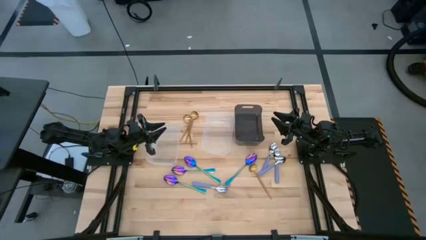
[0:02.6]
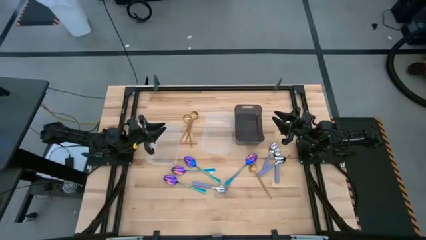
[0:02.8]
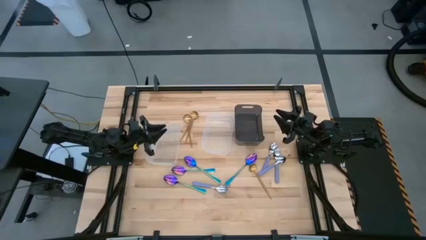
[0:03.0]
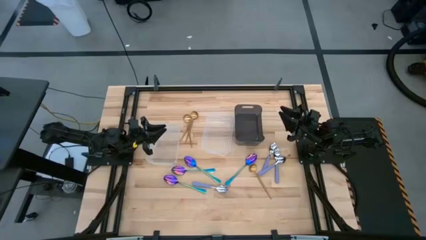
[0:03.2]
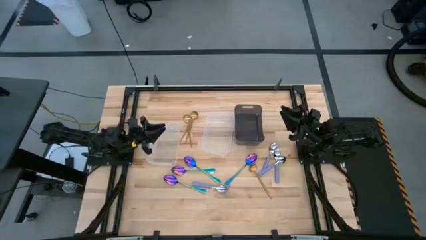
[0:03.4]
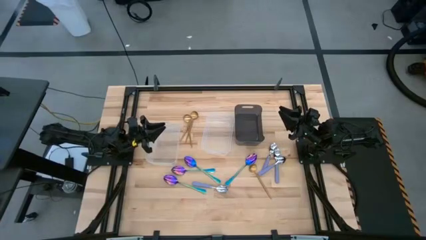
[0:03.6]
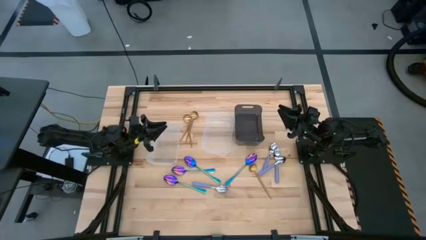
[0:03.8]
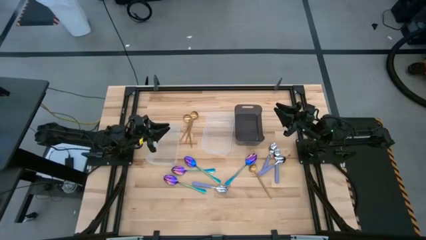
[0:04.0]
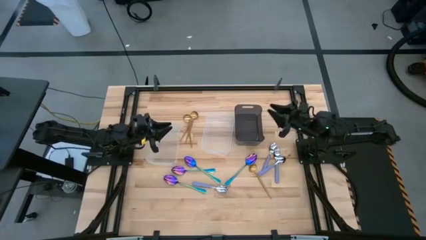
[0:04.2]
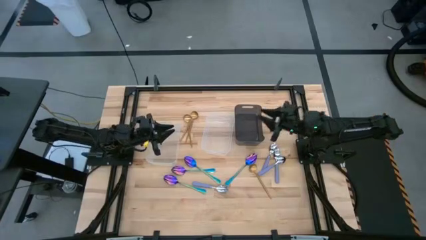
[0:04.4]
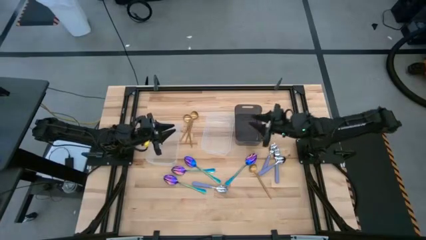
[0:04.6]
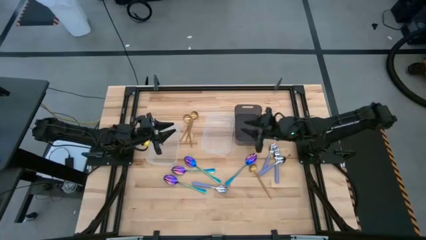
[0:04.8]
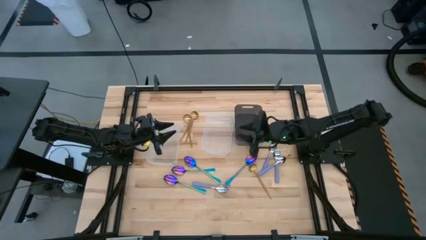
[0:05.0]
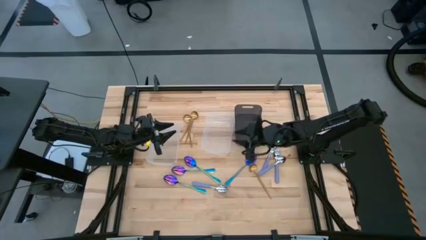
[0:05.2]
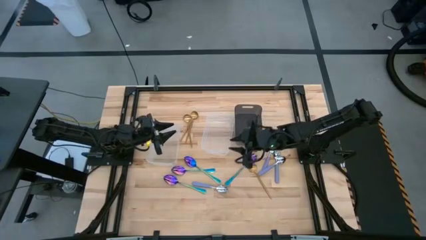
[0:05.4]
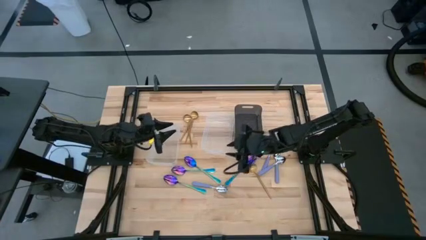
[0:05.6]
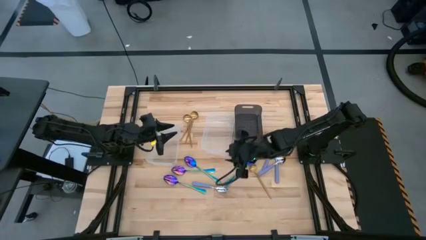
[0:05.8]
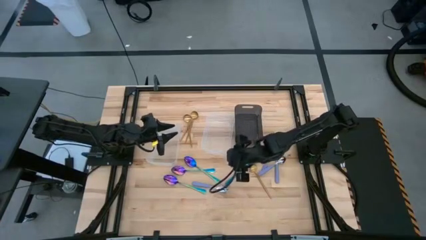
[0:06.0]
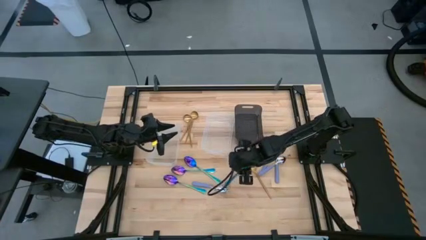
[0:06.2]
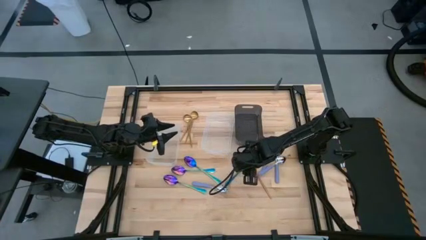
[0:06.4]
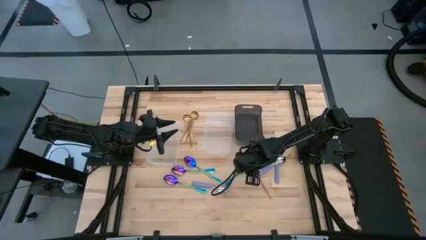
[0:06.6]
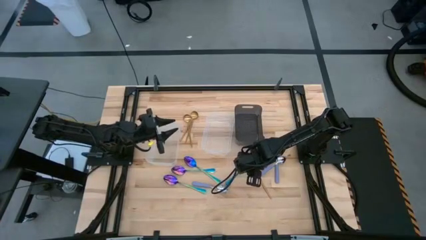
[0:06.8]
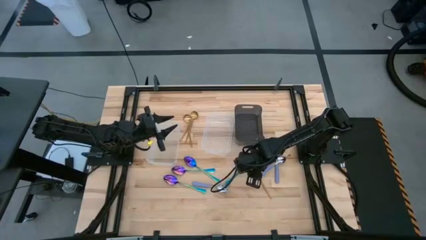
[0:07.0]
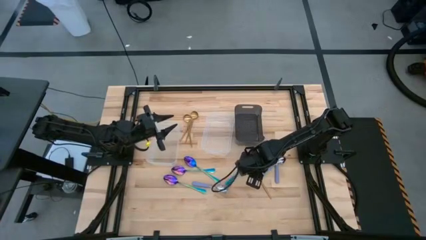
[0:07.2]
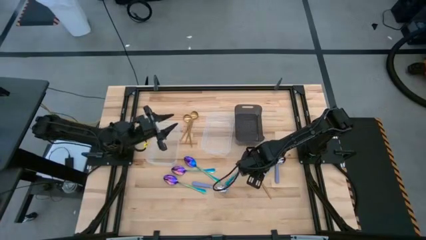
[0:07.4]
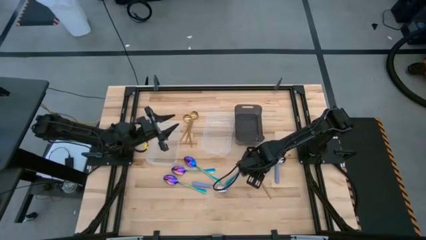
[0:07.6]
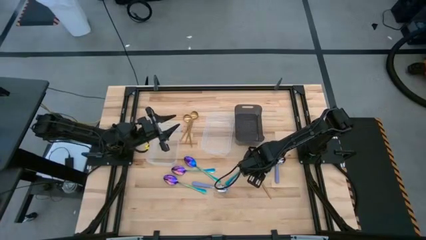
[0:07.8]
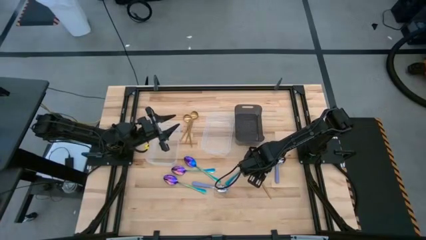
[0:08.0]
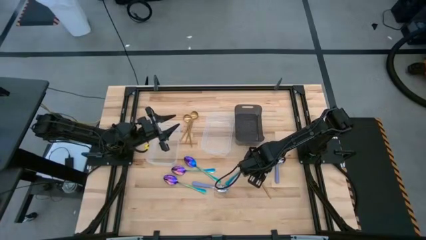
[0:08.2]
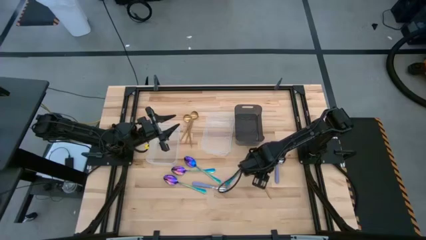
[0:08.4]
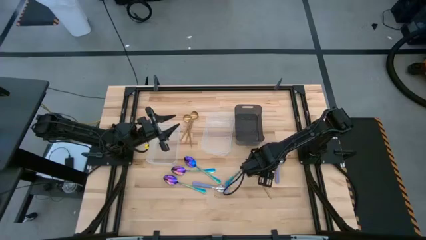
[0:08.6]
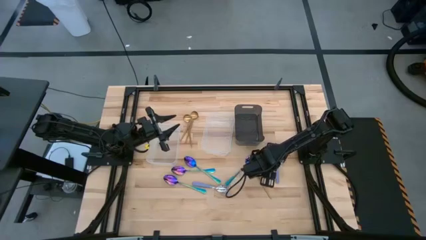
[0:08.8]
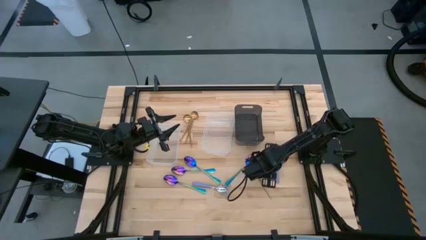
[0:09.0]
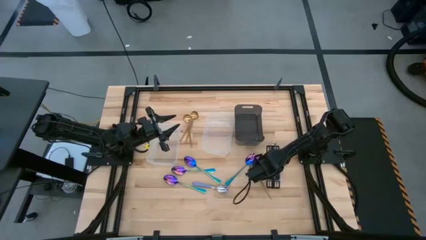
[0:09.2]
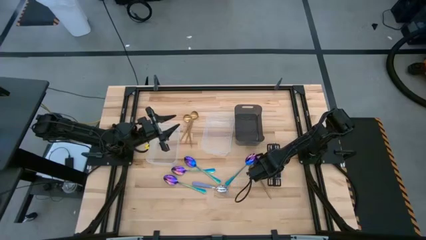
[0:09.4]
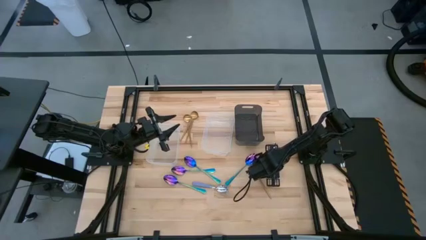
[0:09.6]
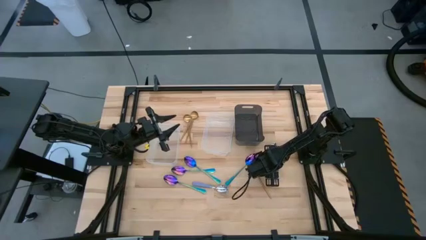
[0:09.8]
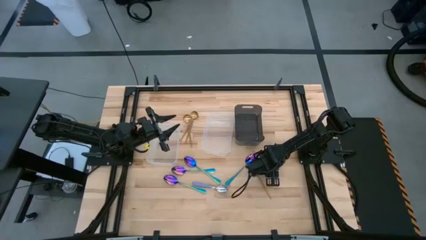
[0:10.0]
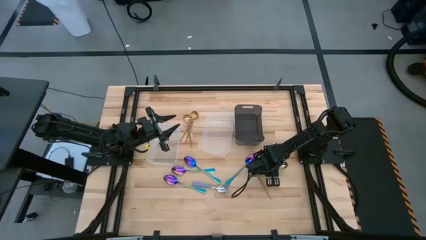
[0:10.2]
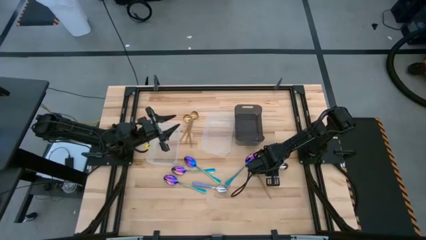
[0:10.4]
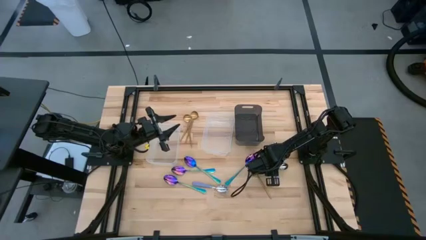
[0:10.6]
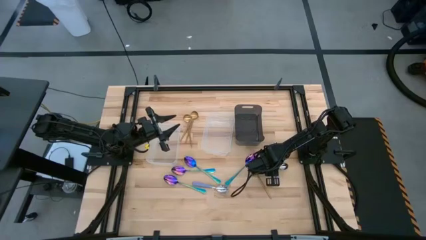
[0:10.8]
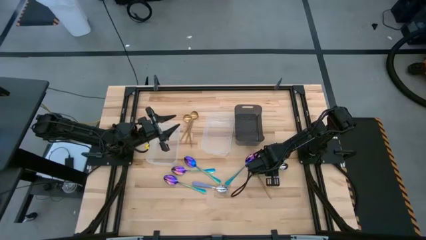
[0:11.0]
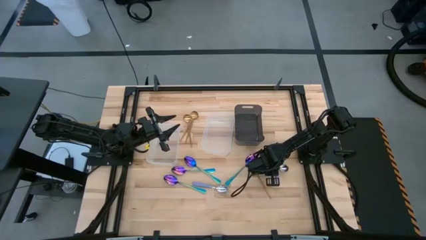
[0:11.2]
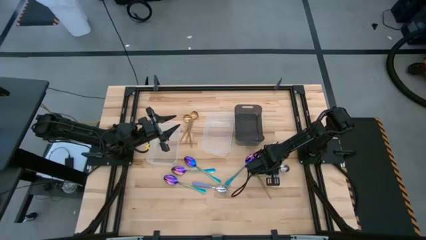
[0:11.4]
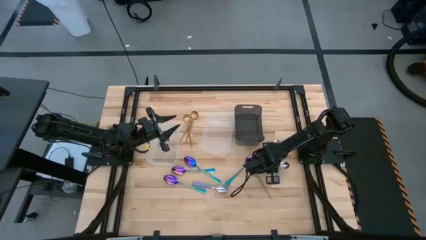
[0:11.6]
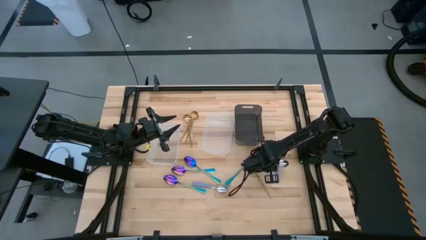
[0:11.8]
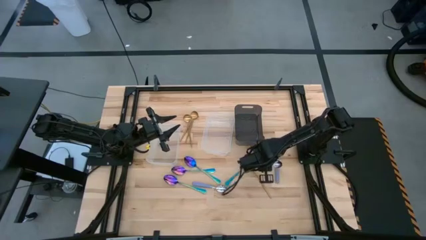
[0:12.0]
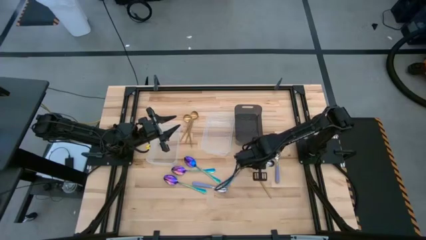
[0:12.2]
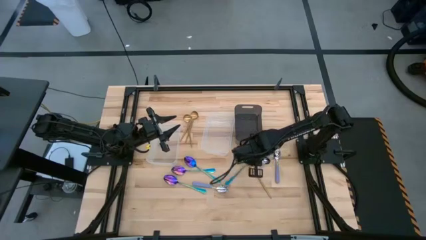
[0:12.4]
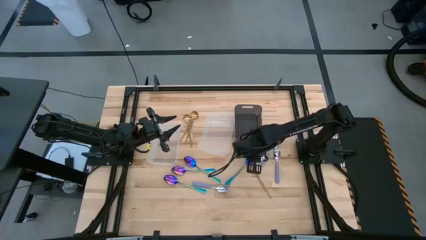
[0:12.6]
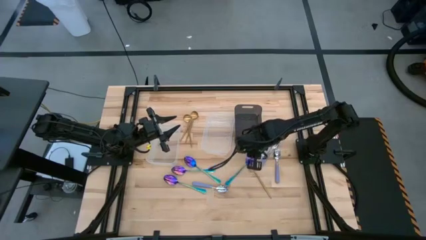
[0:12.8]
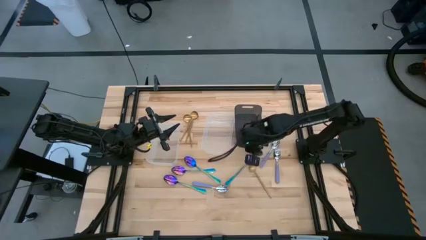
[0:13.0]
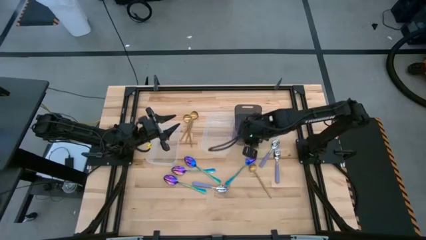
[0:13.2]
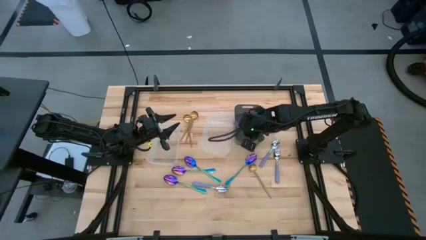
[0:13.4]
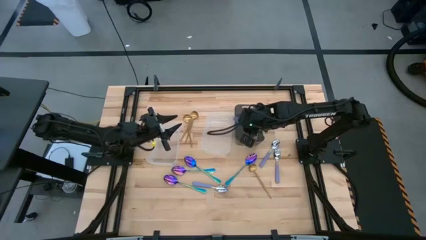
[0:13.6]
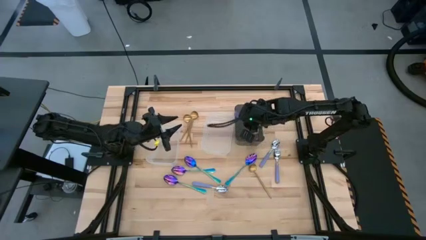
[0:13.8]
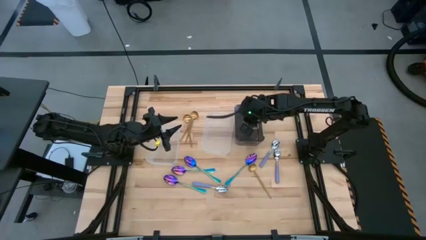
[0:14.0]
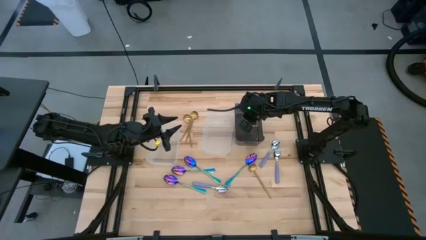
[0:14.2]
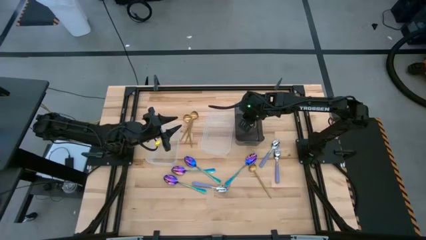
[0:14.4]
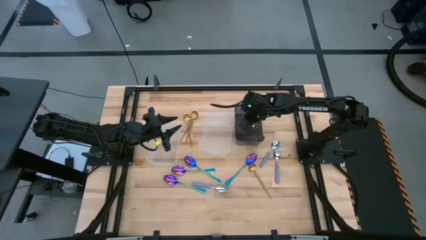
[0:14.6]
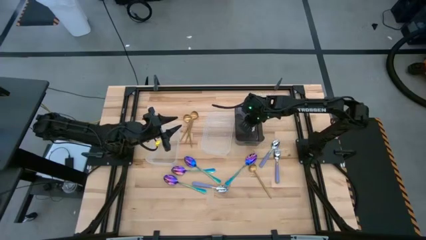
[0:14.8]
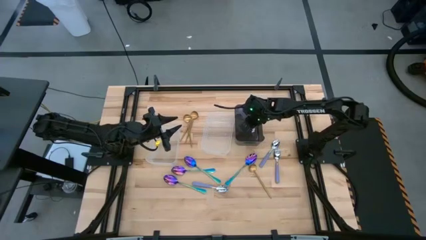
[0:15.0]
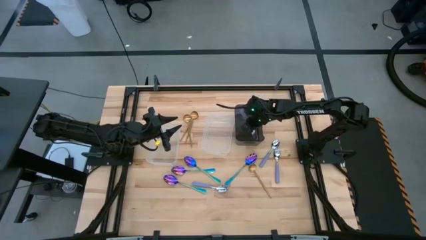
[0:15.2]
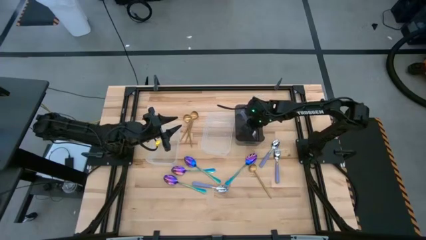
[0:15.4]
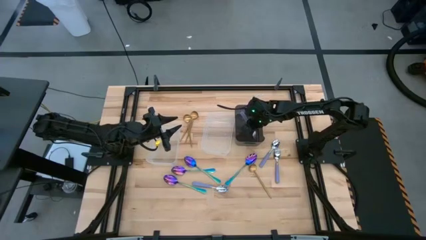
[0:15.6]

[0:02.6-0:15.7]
Task: Sort silverware by color (type)
Put the purple spoon into the black bin
